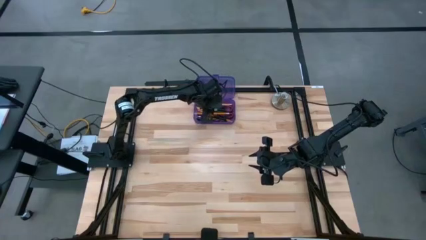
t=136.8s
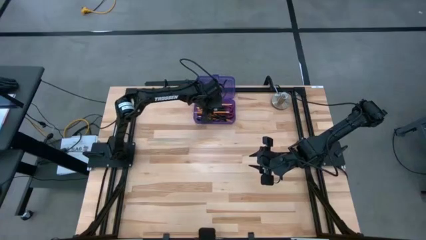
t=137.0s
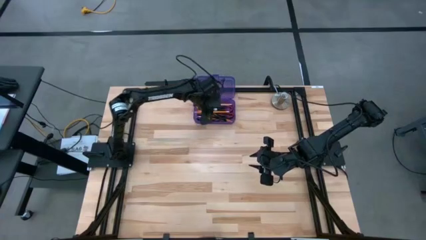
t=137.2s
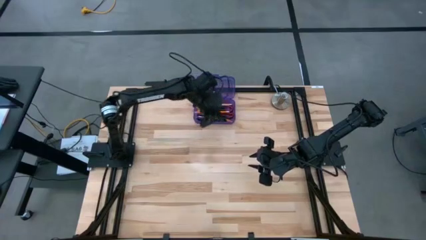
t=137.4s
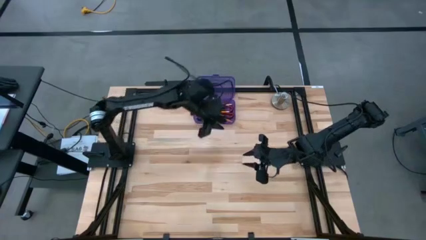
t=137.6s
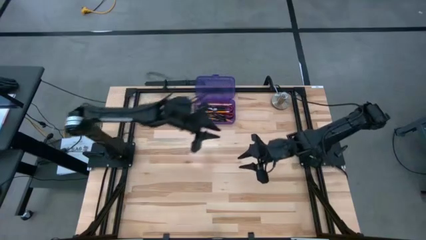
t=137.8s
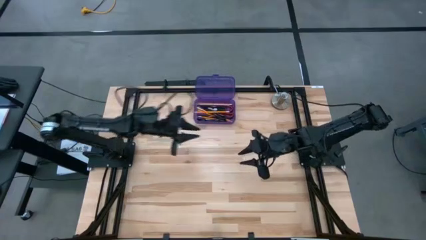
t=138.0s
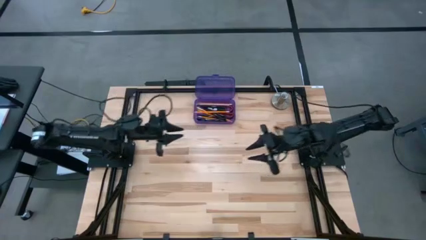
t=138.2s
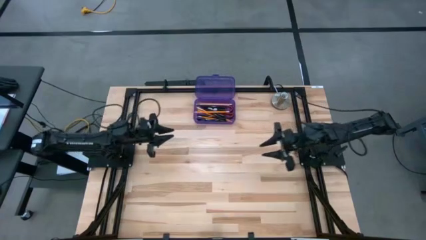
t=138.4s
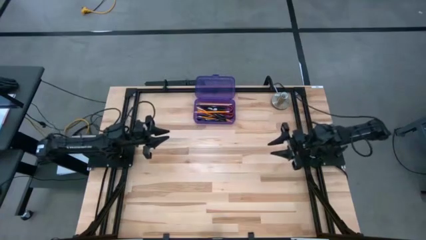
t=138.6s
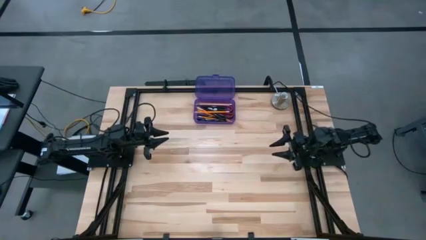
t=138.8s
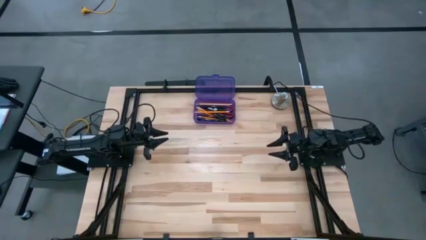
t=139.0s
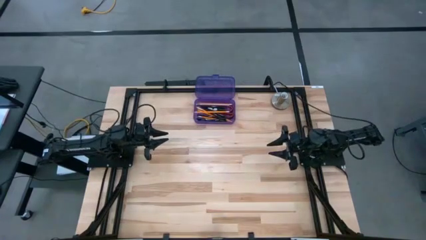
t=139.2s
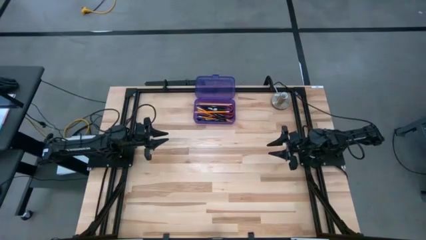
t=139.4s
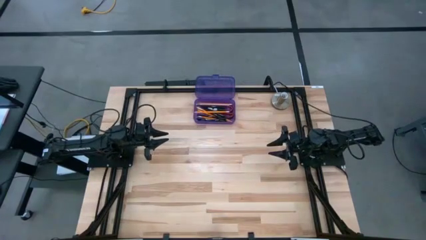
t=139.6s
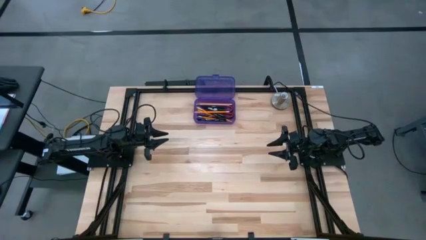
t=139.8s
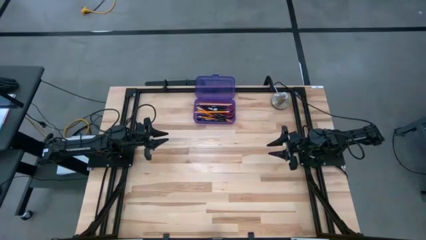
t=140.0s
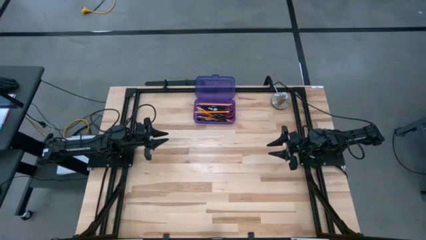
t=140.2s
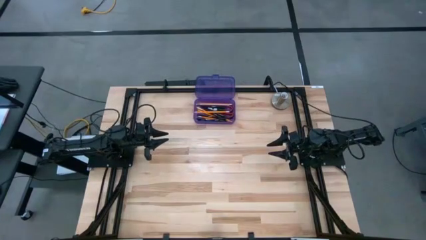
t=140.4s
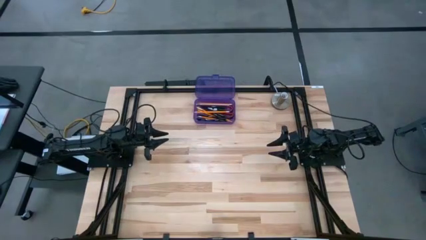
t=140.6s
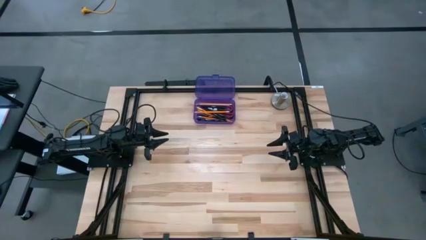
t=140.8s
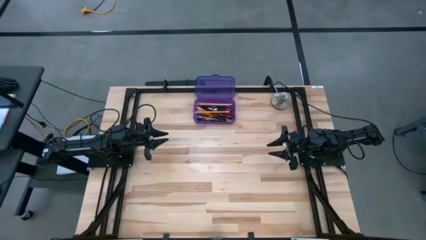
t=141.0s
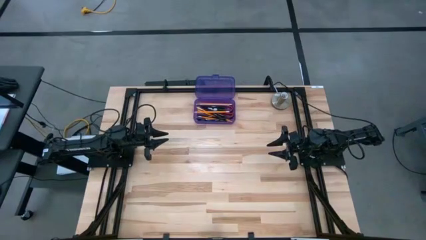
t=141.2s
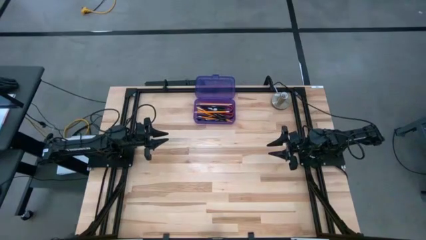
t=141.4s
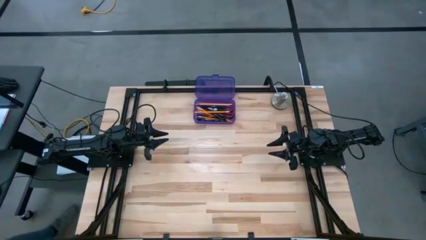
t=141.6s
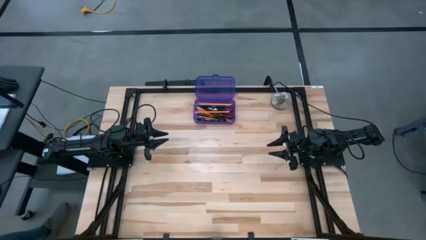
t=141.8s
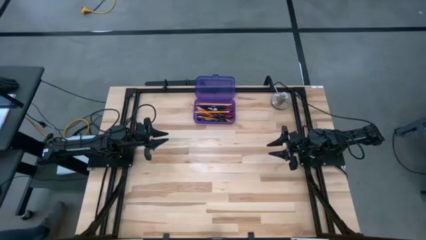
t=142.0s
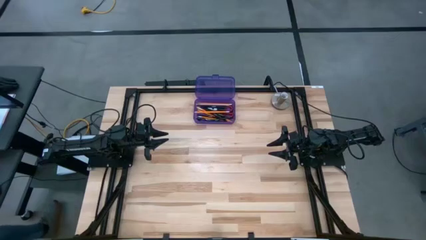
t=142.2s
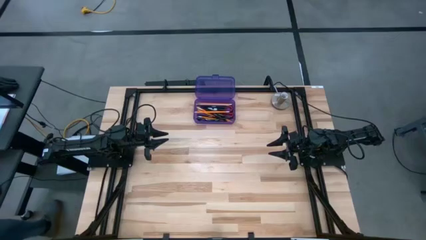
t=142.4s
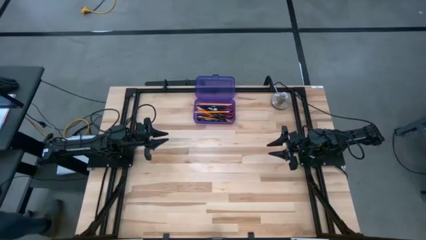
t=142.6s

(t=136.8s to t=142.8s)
Task: Pick & place school supplies into a supply box
Return to Home Position

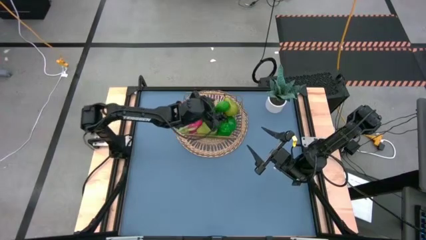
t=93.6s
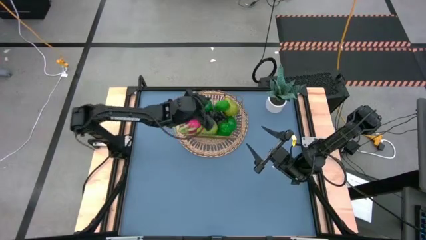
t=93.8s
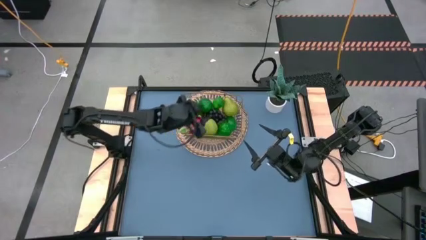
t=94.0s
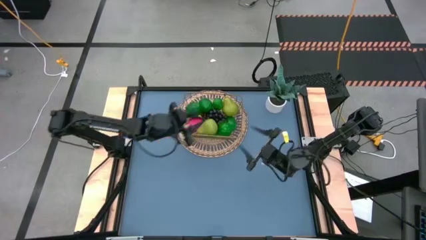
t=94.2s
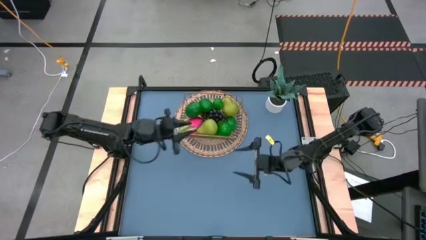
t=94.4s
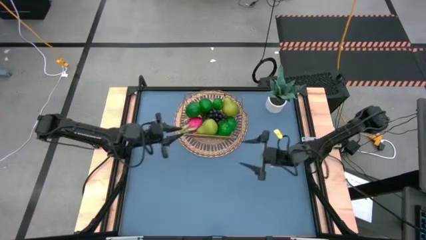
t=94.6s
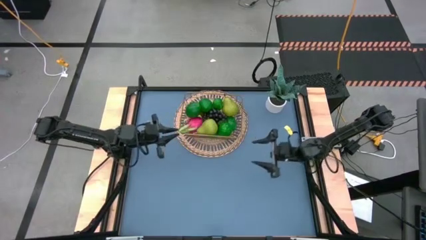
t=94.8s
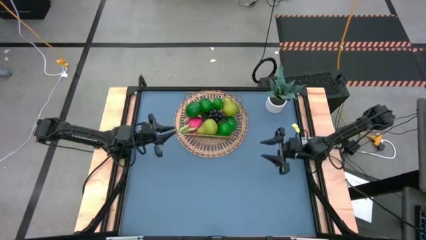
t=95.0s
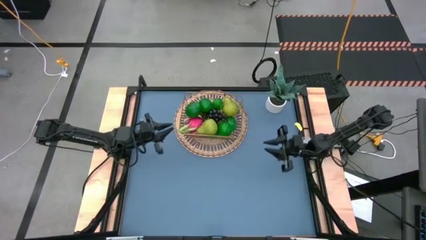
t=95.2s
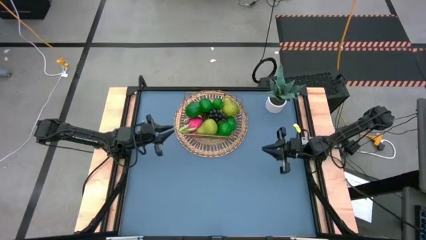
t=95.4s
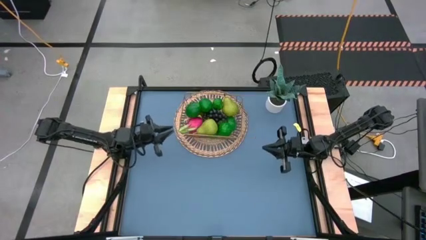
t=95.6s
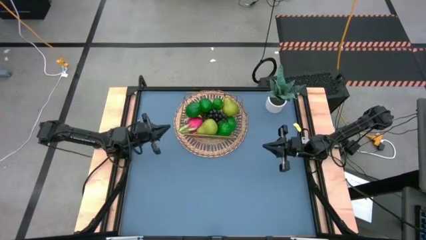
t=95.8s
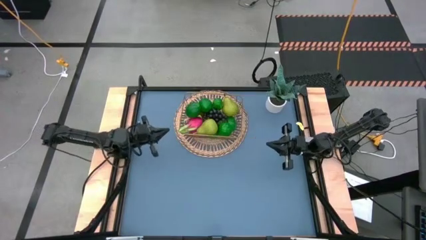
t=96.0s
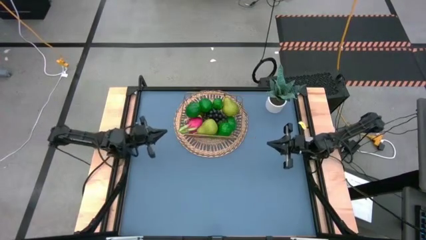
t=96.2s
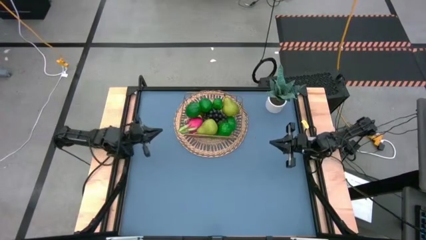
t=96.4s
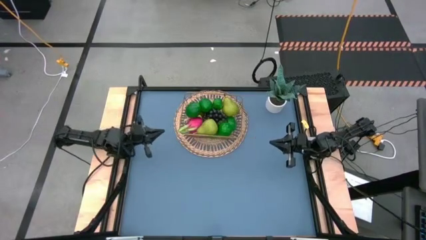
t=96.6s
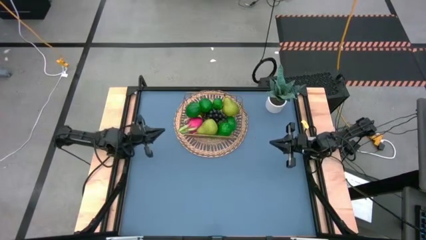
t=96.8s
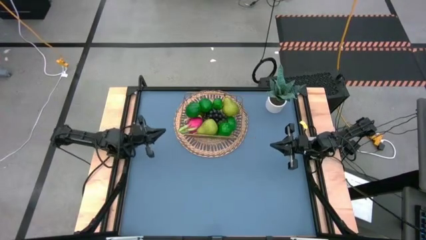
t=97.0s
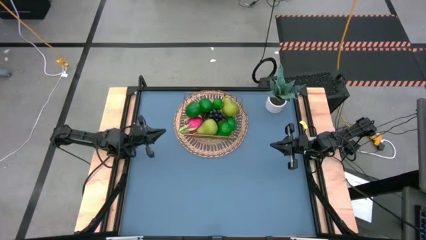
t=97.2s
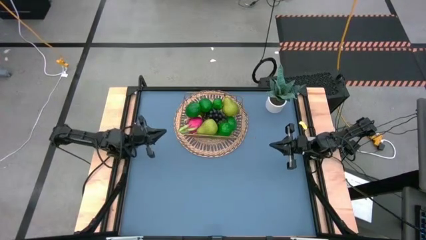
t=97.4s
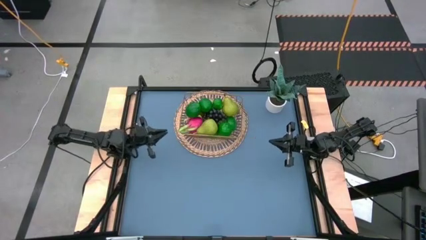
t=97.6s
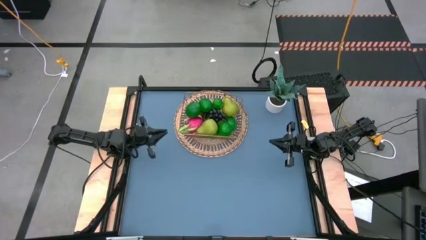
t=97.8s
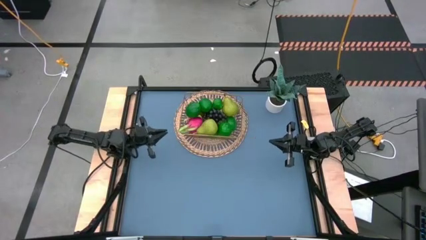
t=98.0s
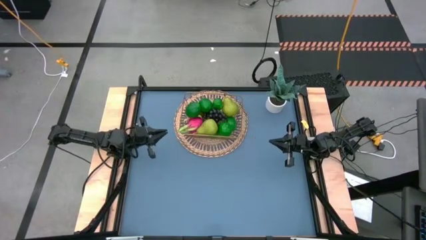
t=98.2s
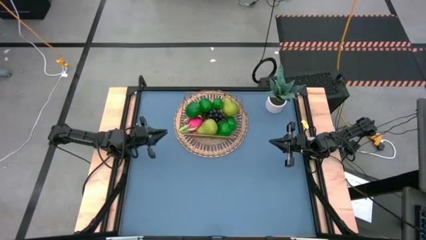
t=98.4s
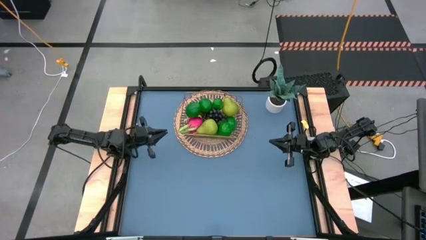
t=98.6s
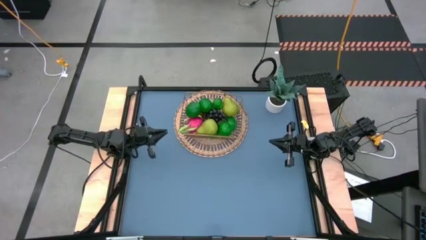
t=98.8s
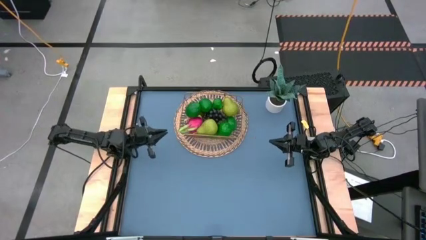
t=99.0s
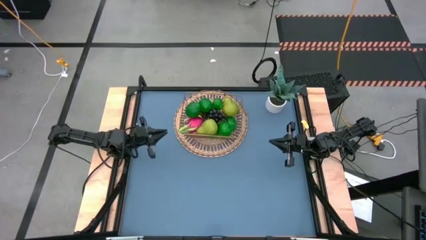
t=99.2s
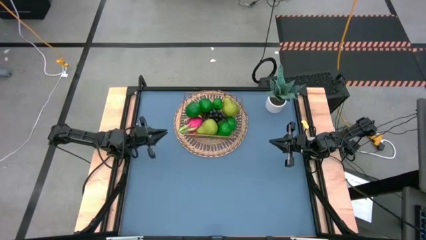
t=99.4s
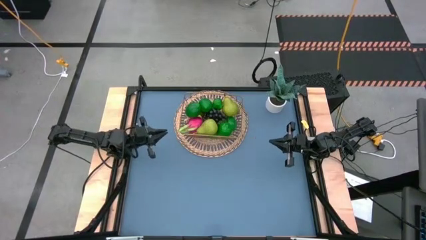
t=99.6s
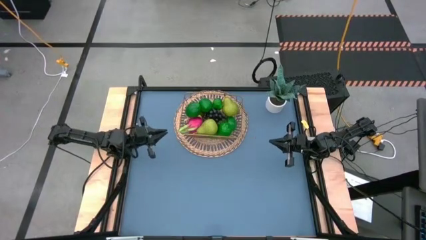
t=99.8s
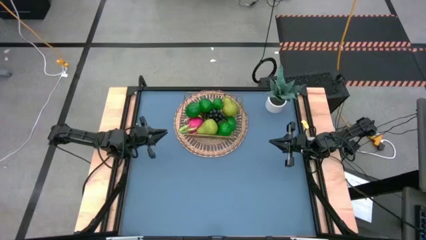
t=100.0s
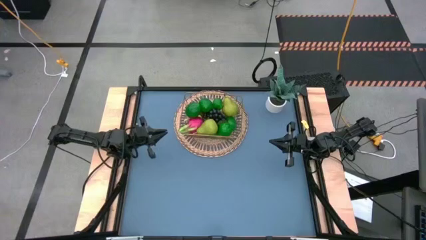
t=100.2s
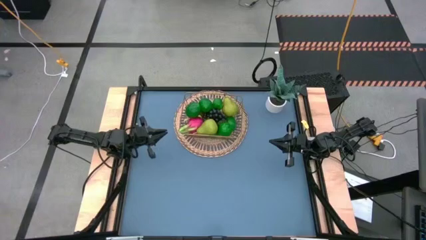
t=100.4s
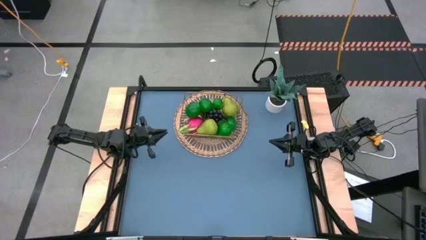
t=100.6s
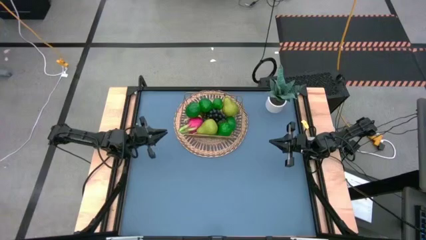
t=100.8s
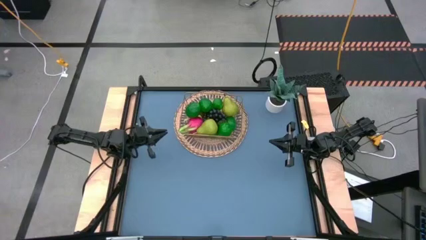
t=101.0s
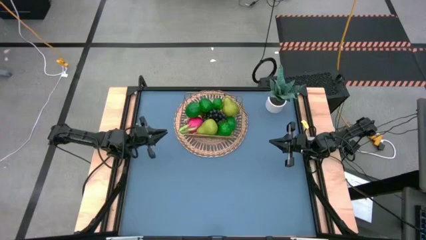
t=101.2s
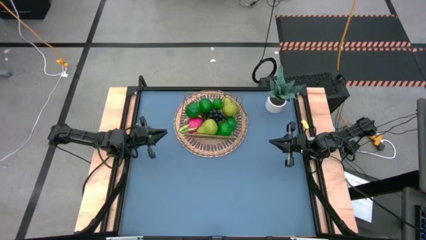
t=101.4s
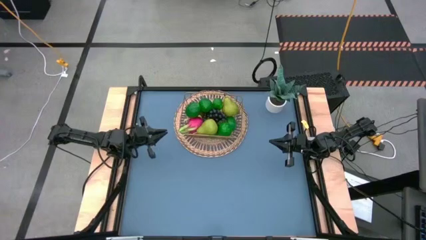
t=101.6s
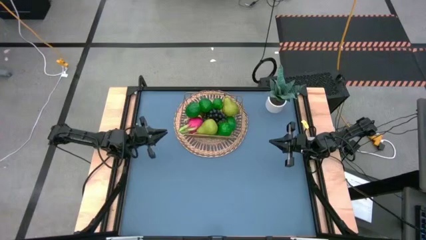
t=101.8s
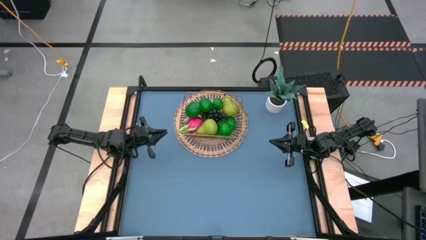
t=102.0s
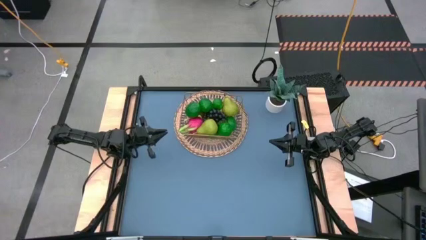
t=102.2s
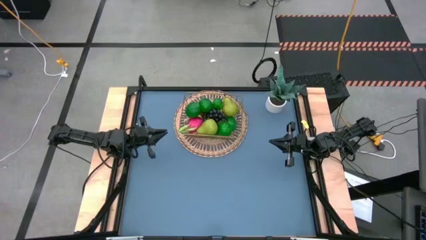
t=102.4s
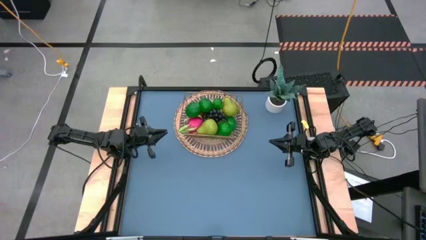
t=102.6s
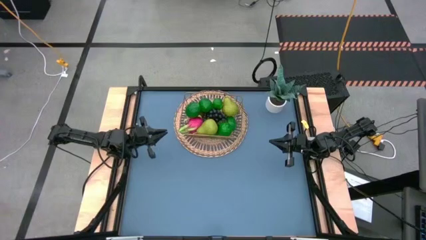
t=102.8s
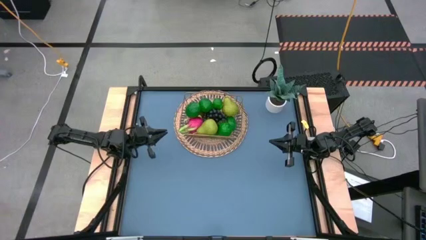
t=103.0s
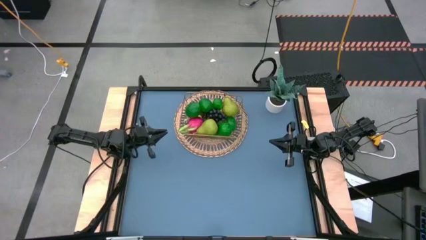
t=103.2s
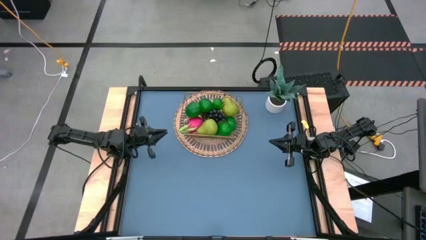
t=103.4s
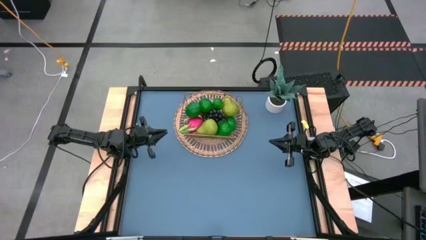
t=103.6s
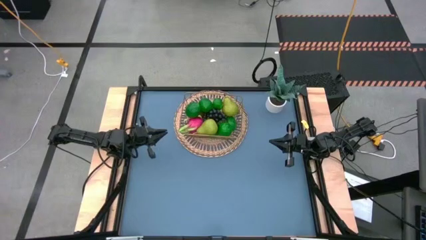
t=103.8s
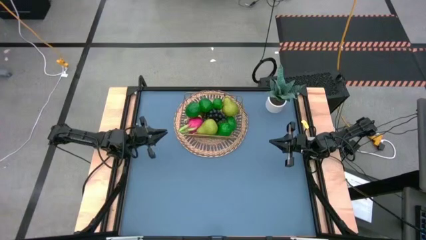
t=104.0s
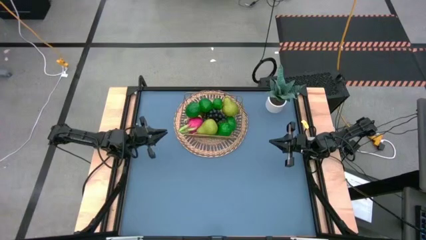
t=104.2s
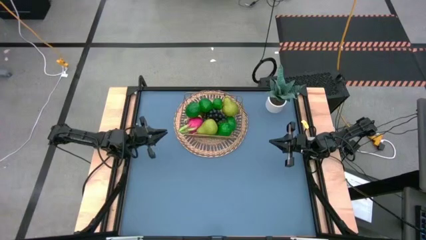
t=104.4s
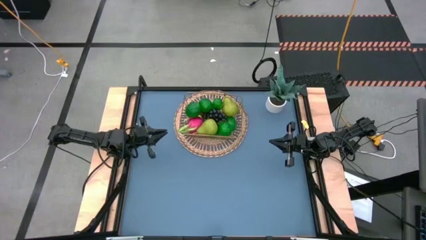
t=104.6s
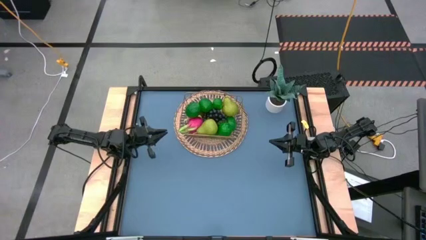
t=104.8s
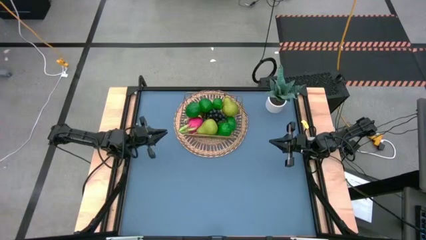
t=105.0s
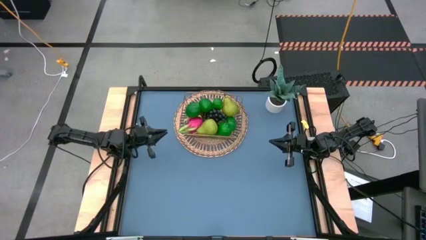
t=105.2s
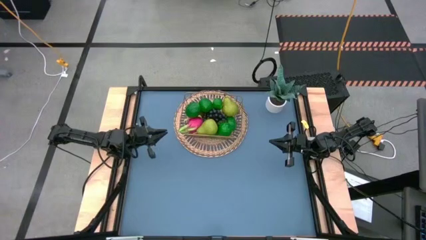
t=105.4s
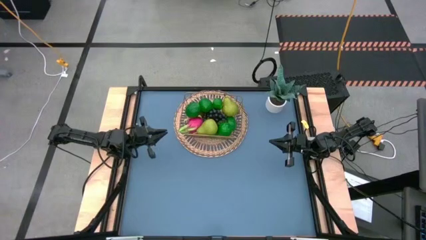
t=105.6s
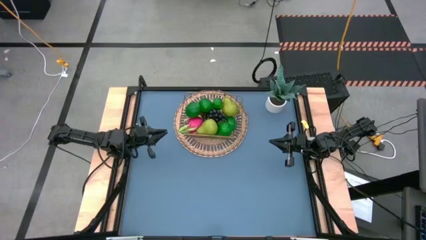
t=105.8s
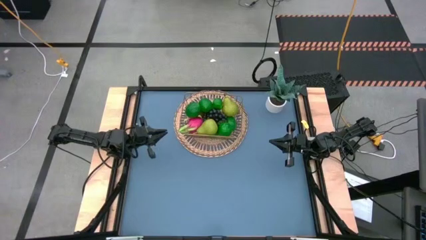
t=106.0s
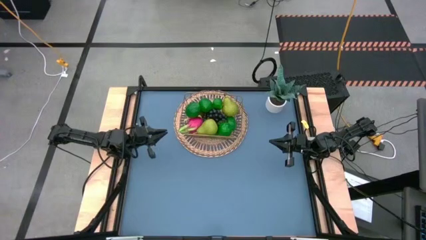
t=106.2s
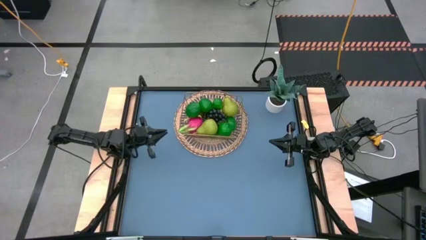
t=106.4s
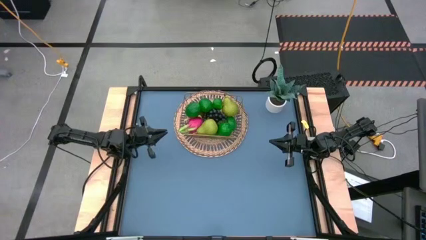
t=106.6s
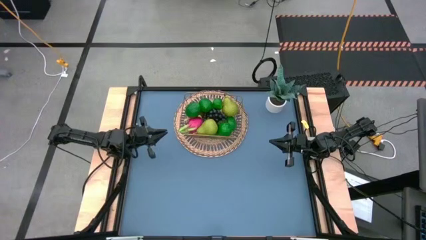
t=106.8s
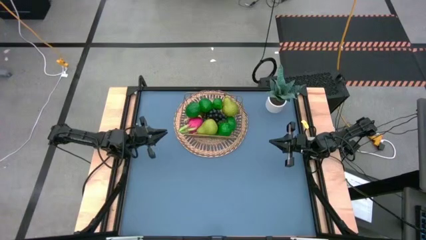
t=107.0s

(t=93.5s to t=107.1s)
Task: Build produce basket
Return to Home Position
